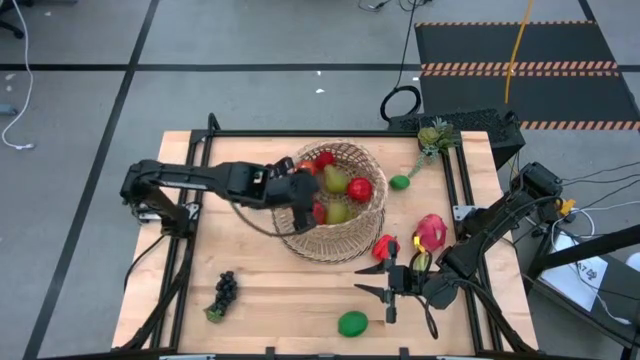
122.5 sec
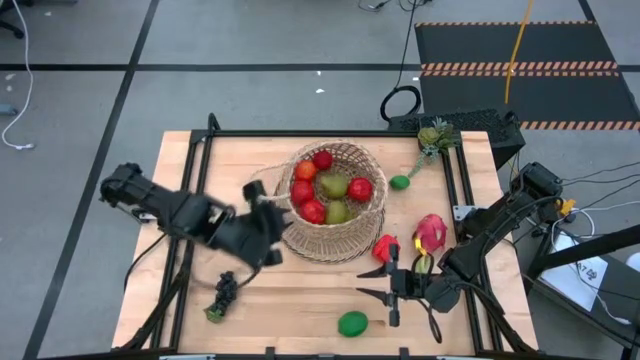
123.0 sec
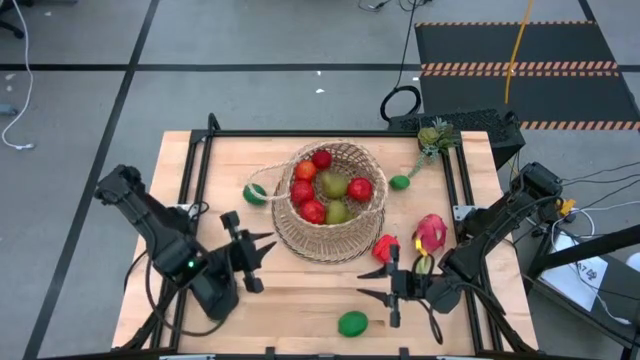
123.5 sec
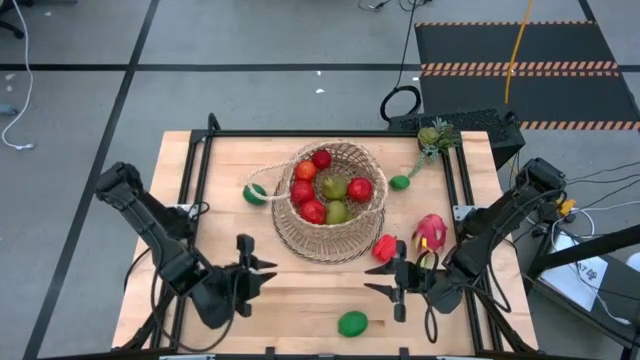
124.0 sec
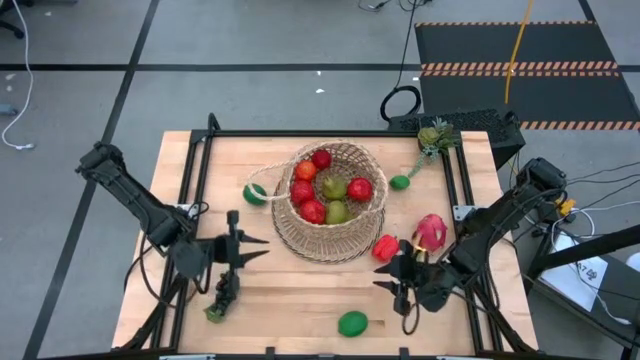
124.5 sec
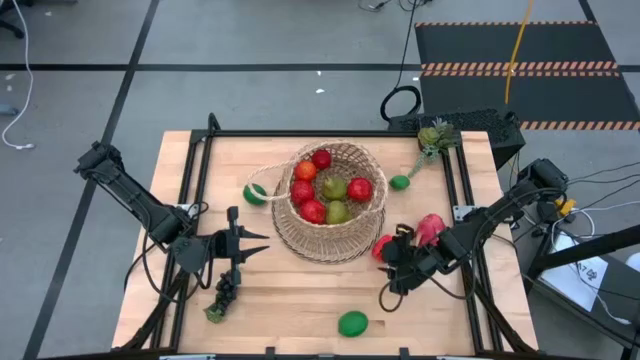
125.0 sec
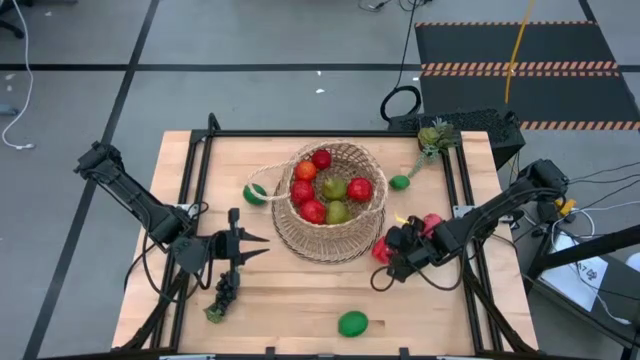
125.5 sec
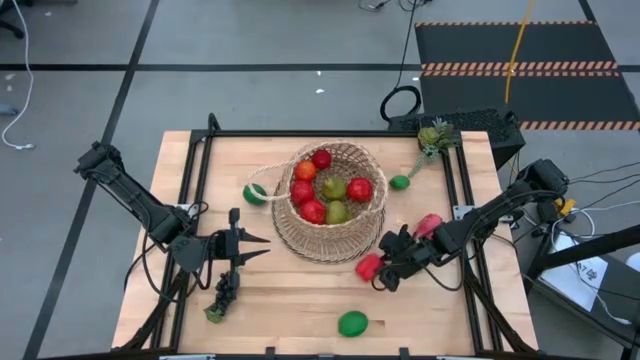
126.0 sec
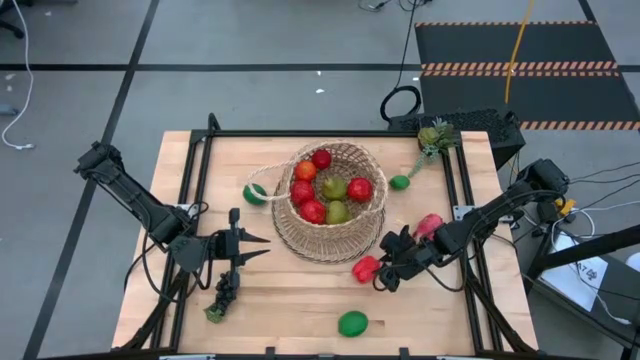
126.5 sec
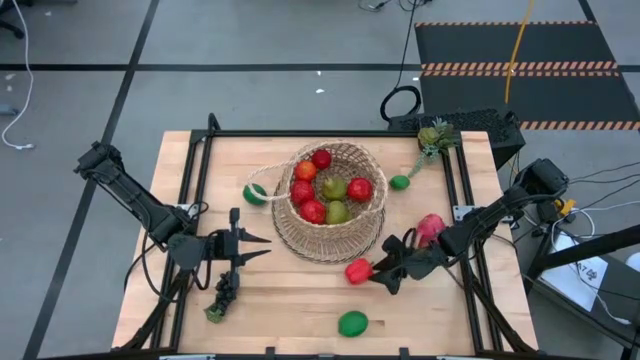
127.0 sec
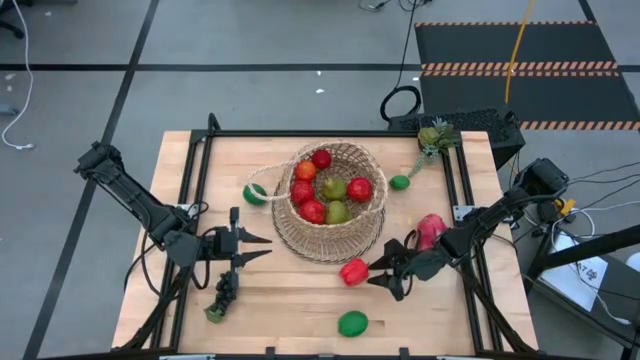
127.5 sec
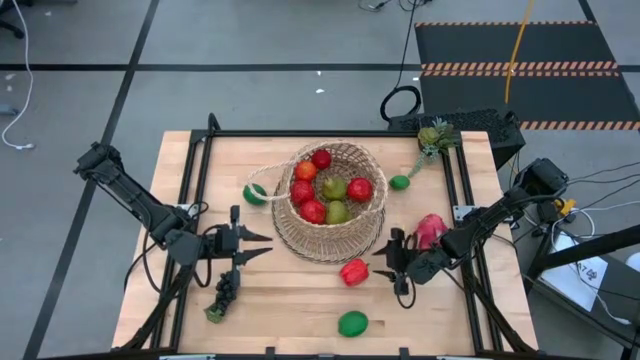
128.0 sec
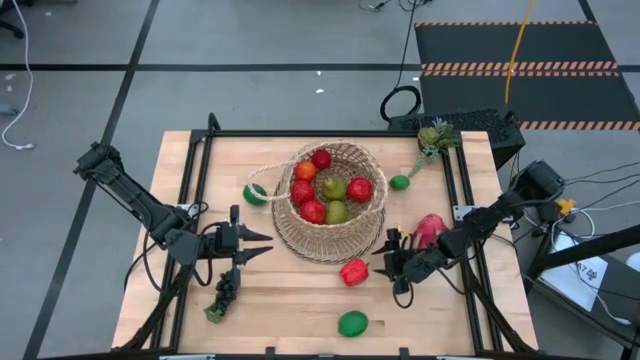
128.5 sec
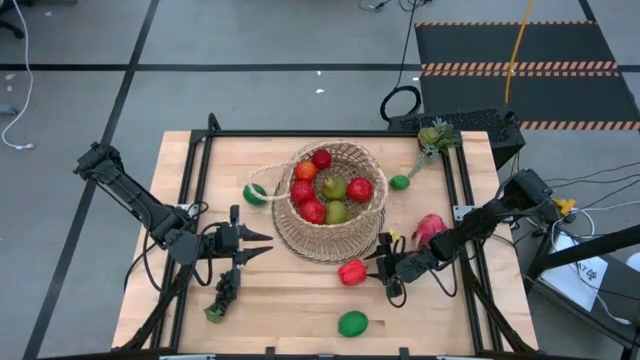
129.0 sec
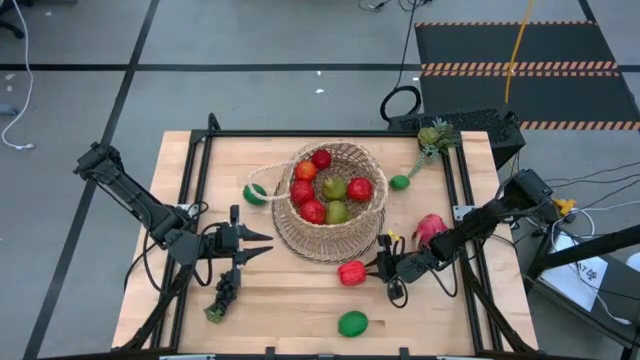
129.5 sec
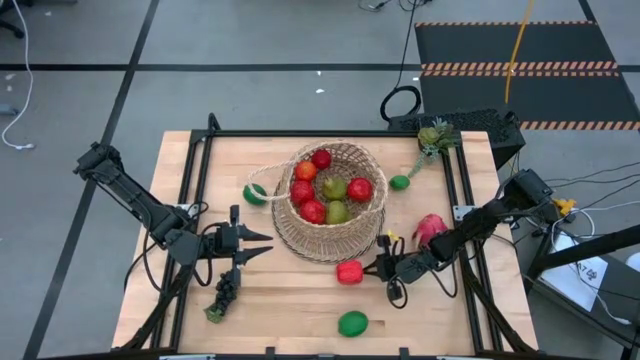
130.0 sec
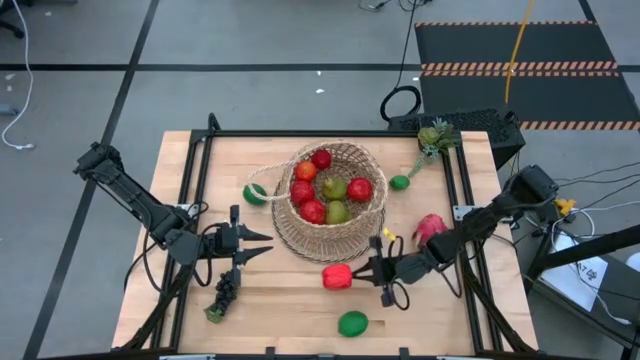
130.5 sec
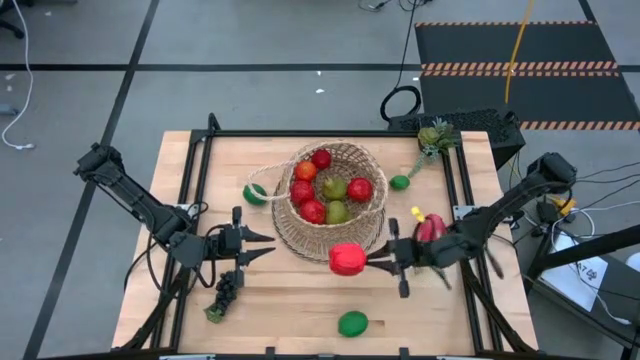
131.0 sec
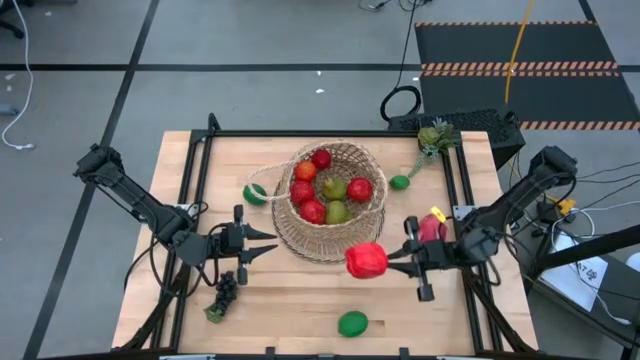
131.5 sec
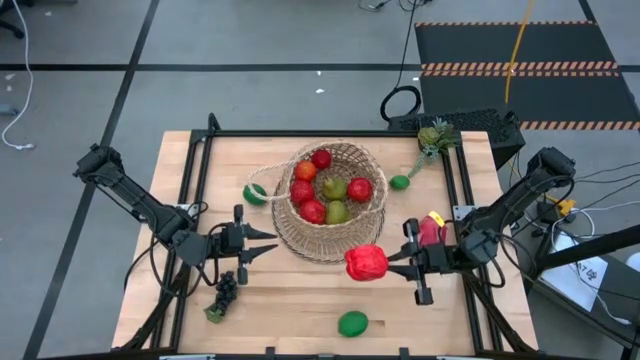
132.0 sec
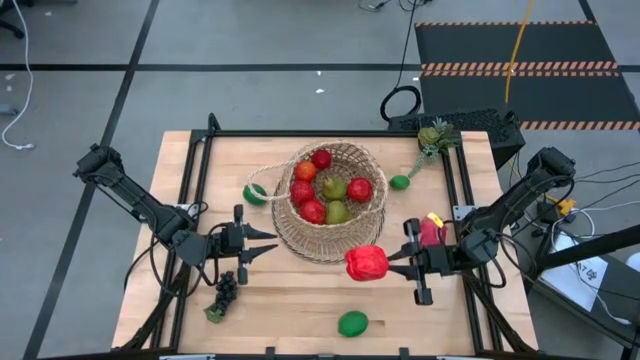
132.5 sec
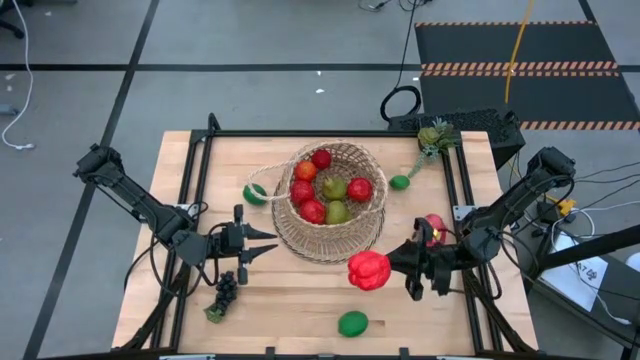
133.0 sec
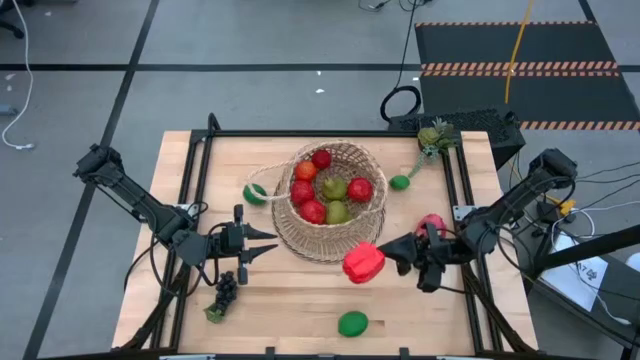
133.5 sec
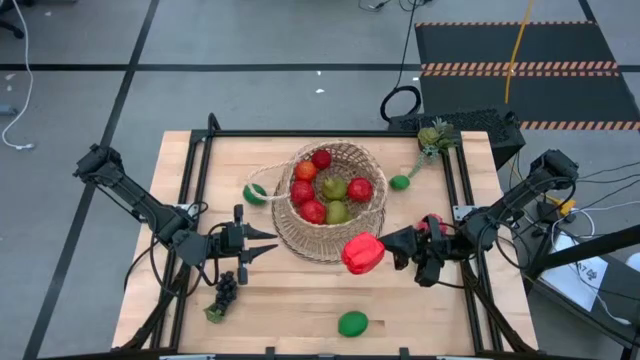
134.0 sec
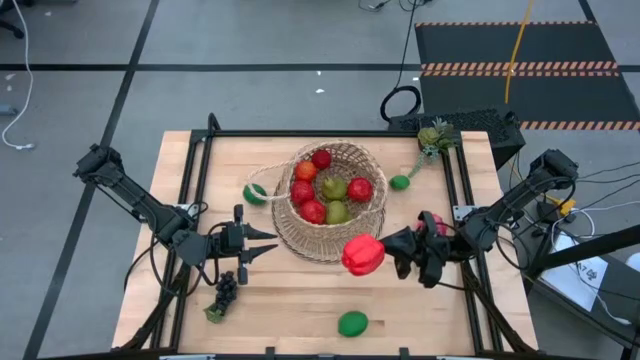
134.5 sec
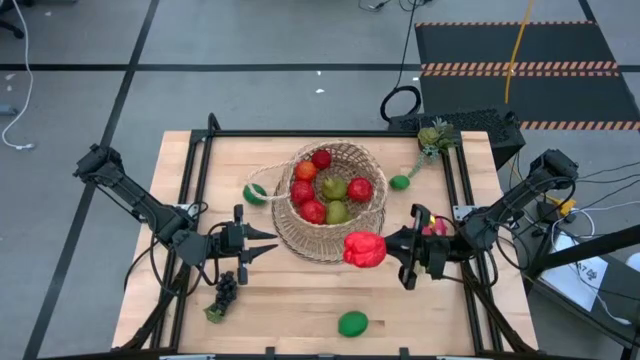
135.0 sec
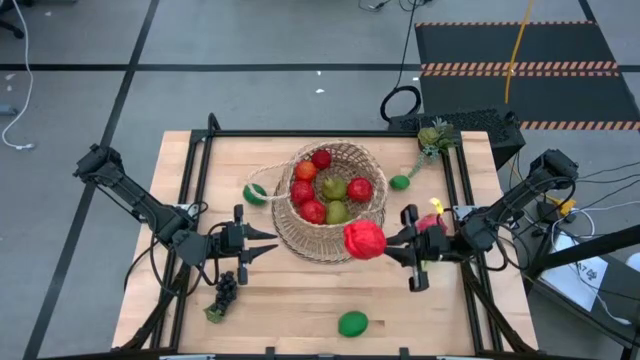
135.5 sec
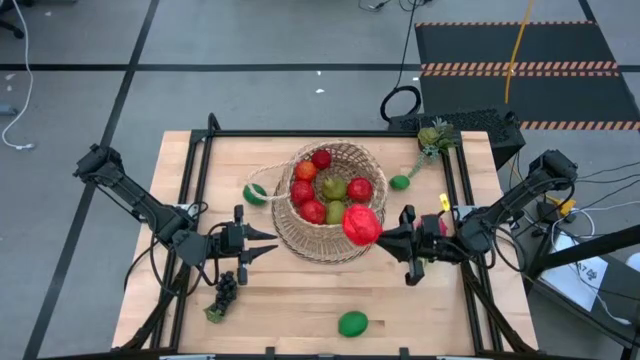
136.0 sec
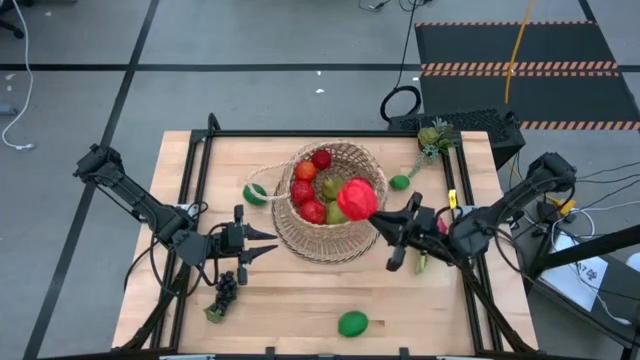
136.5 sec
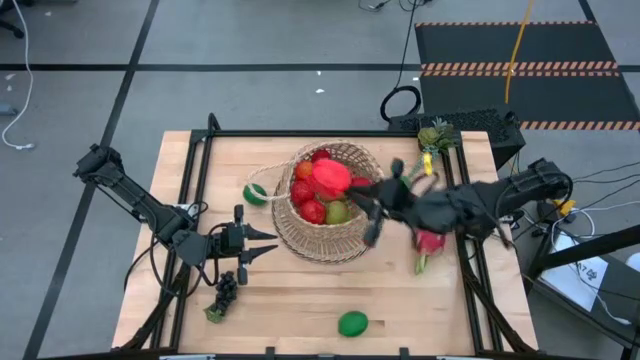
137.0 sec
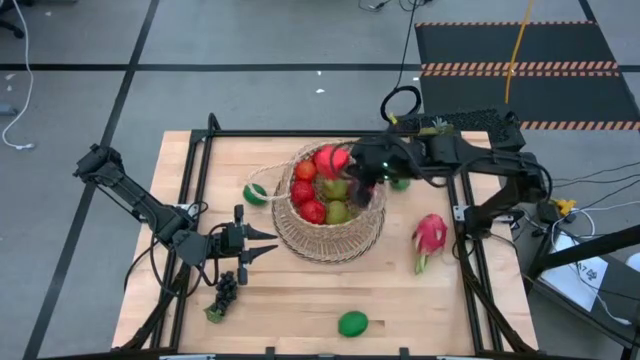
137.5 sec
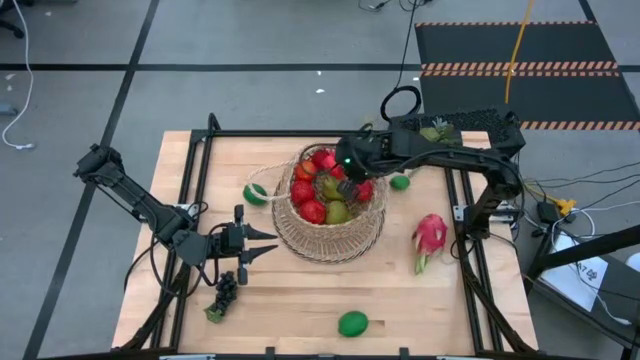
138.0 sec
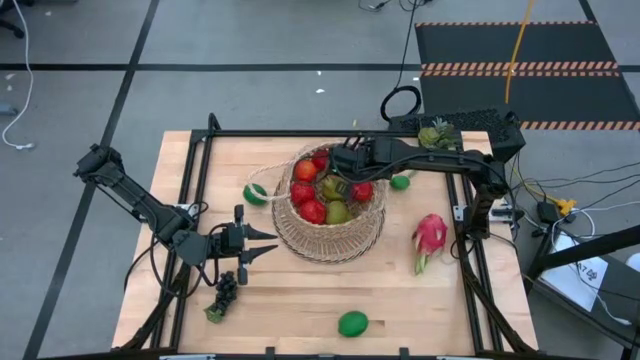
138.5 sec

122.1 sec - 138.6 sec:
Task: Build produce basket
Put the red bell pepper into the basket

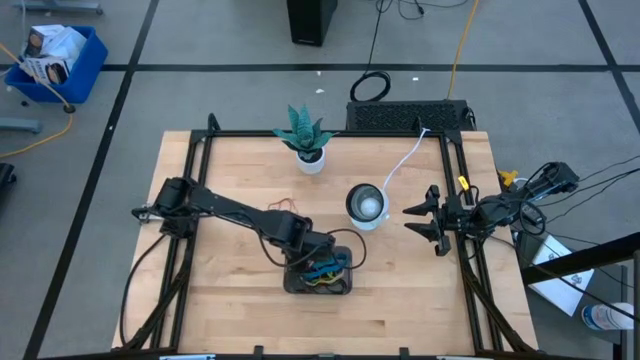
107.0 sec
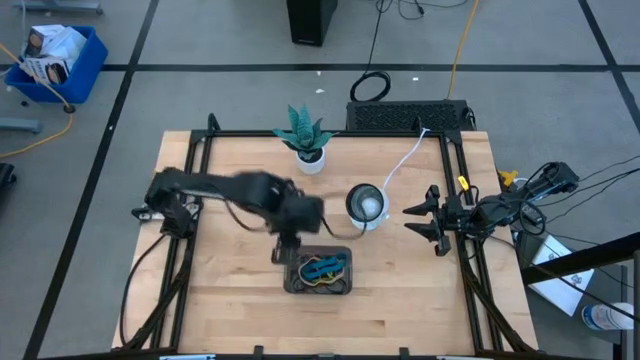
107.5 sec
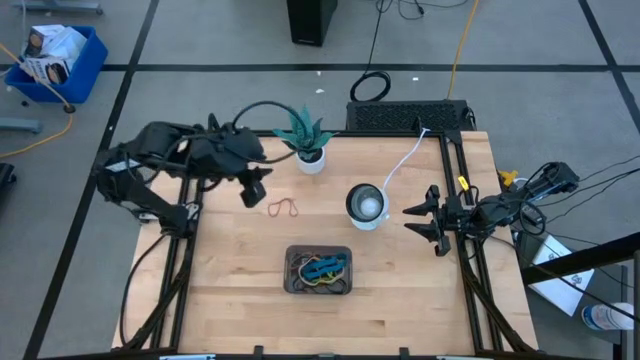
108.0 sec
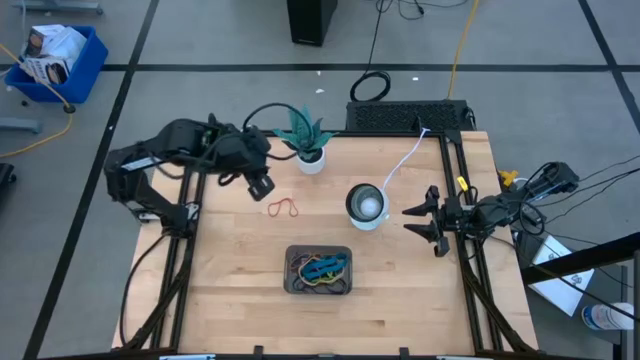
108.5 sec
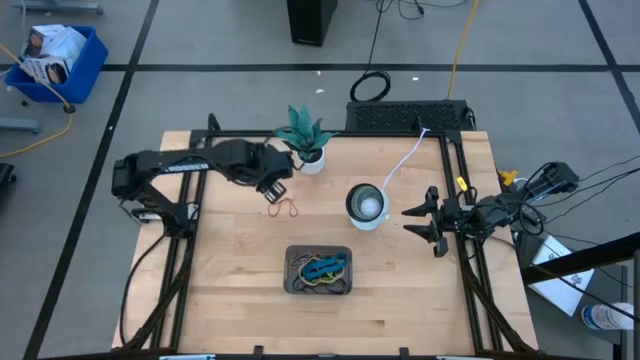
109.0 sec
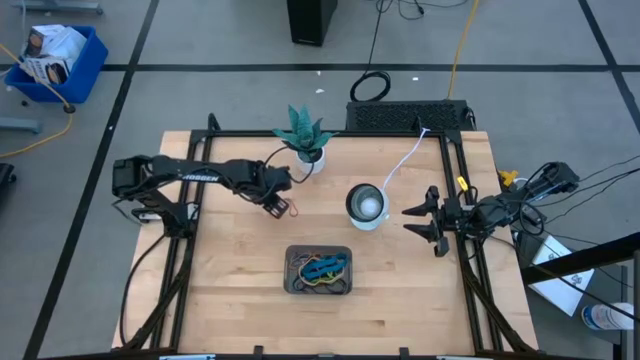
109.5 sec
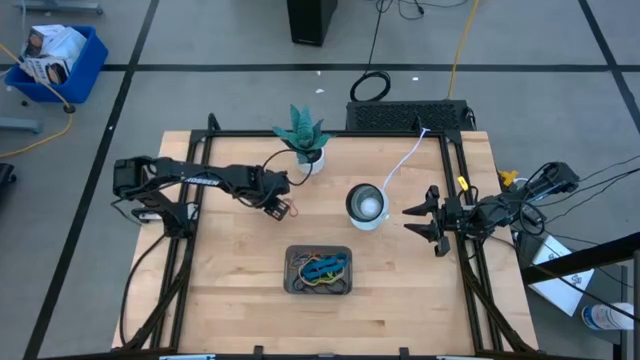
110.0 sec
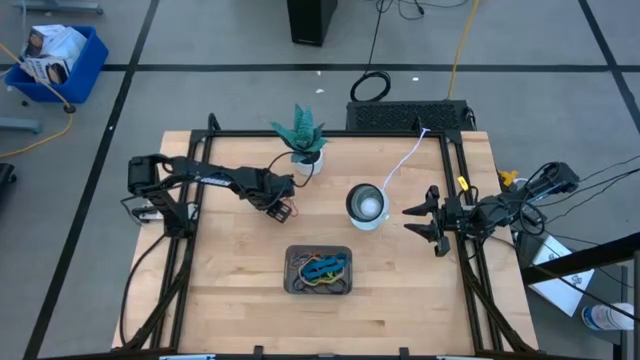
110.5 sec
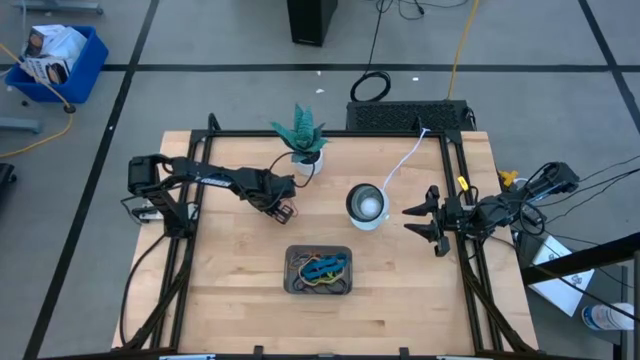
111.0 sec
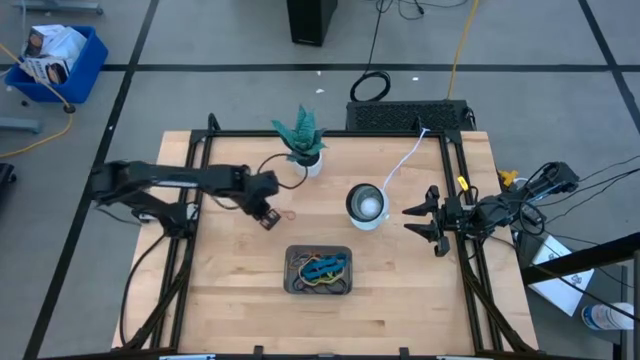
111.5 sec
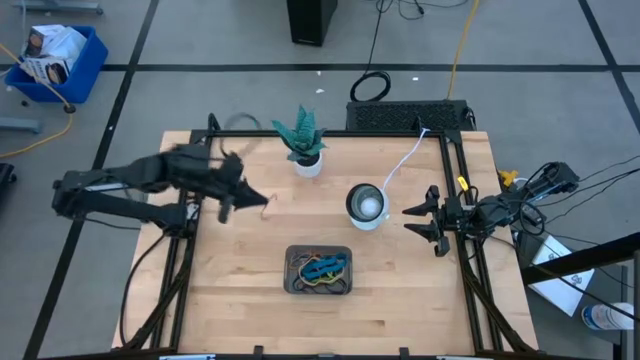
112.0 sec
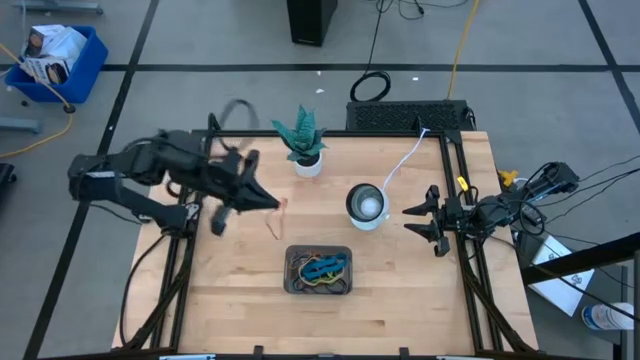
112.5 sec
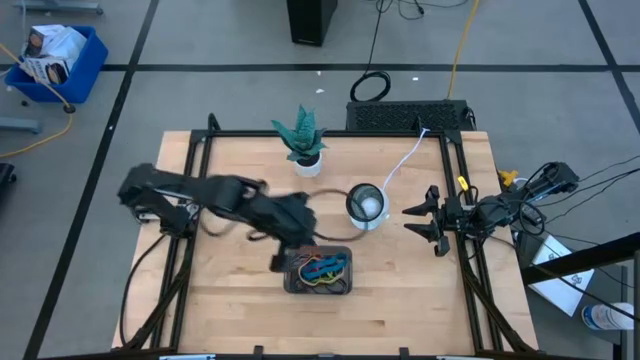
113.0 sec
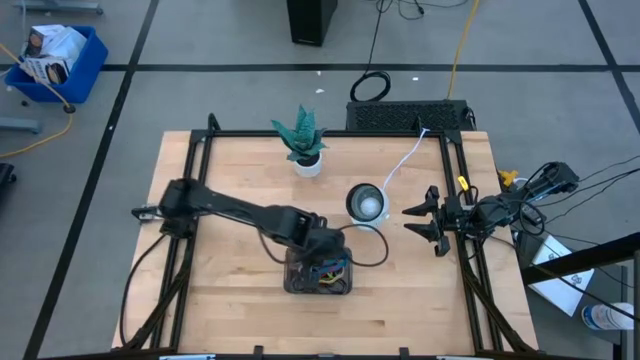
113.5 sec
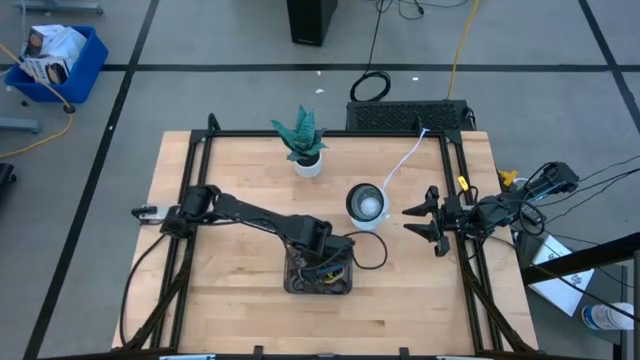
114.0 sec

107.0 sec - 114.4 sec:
Task: Pick and place rubber bands into bin
Put the red rubber band into the gray bin
